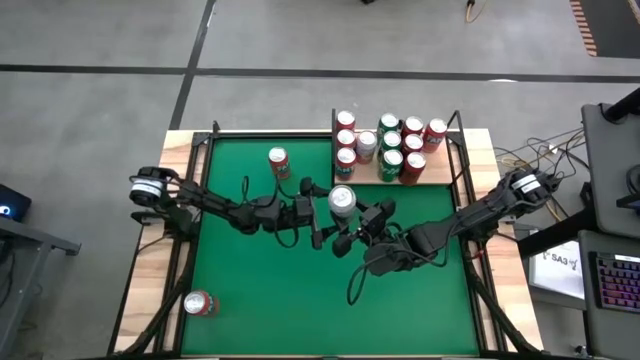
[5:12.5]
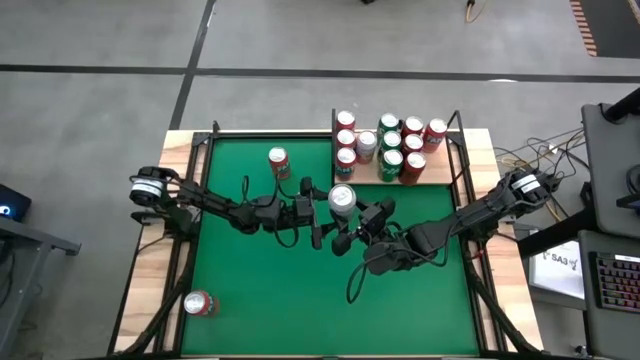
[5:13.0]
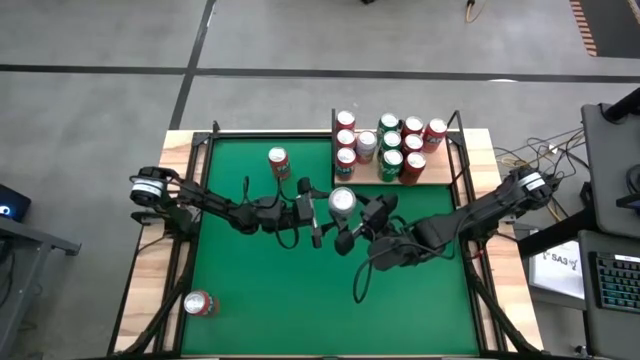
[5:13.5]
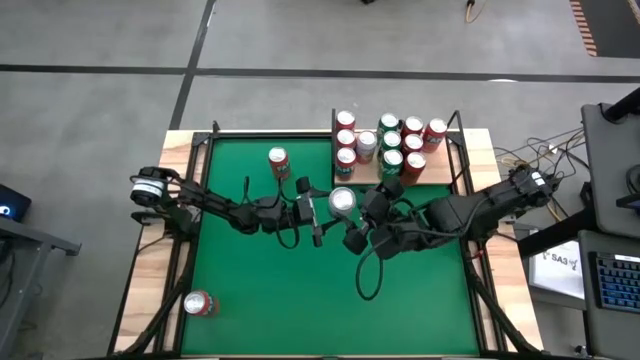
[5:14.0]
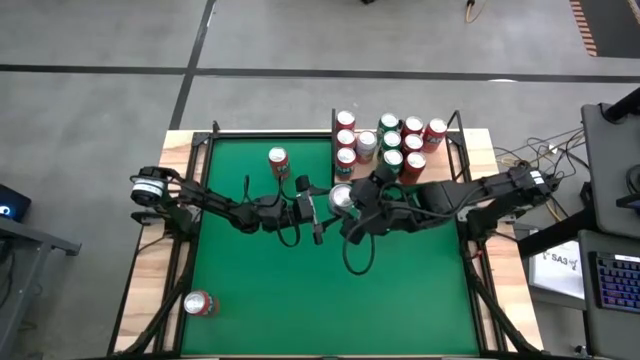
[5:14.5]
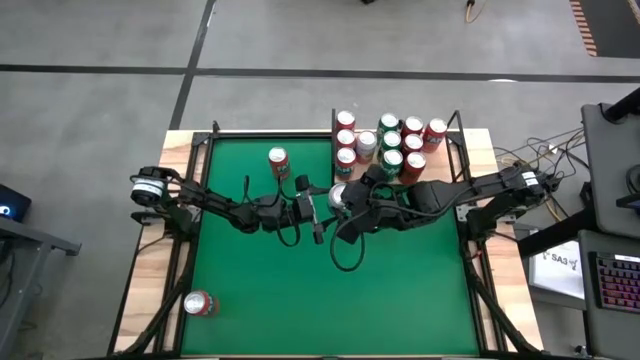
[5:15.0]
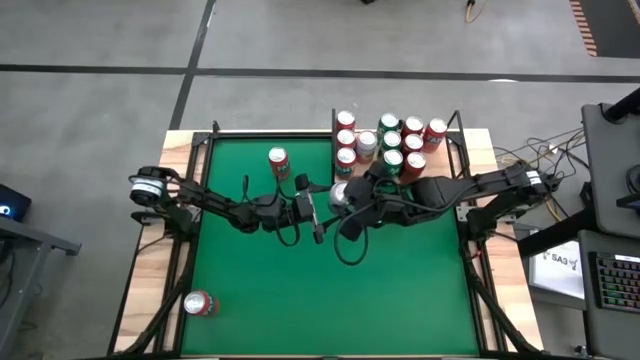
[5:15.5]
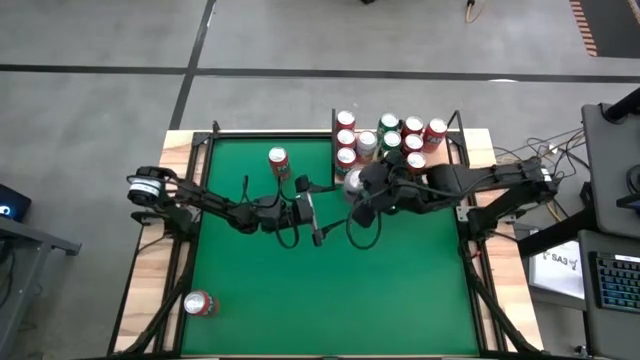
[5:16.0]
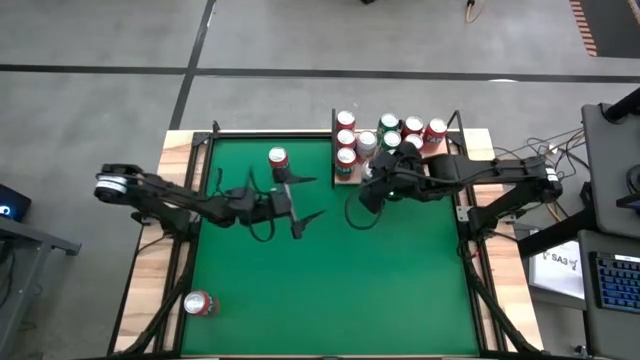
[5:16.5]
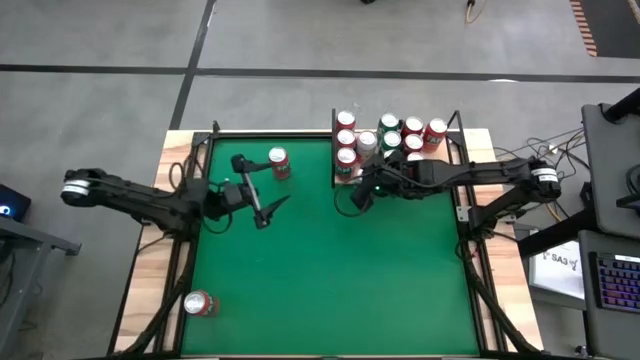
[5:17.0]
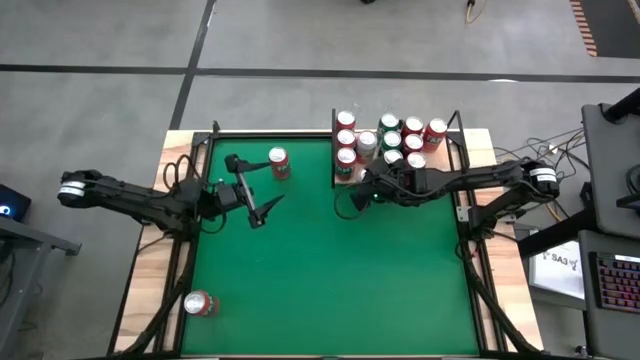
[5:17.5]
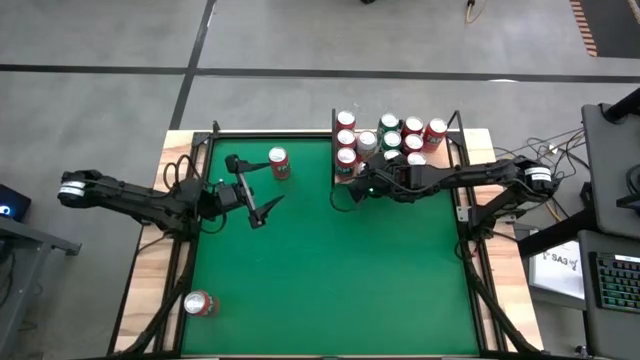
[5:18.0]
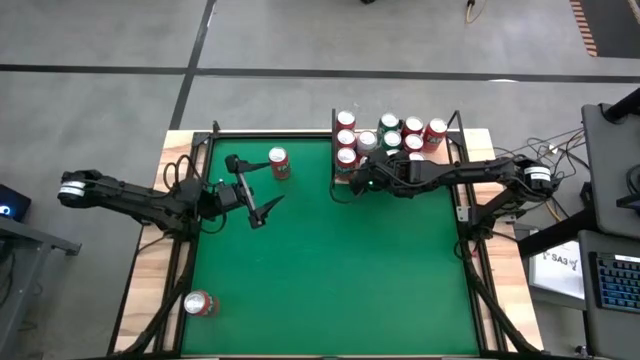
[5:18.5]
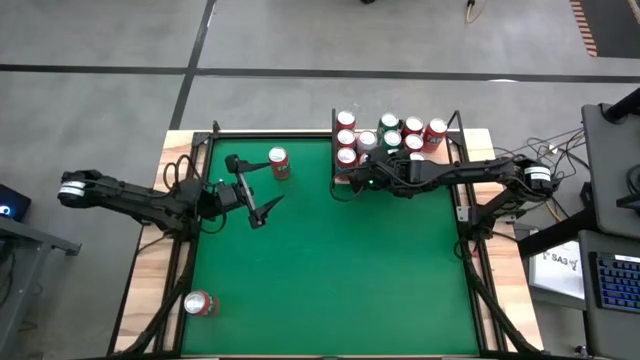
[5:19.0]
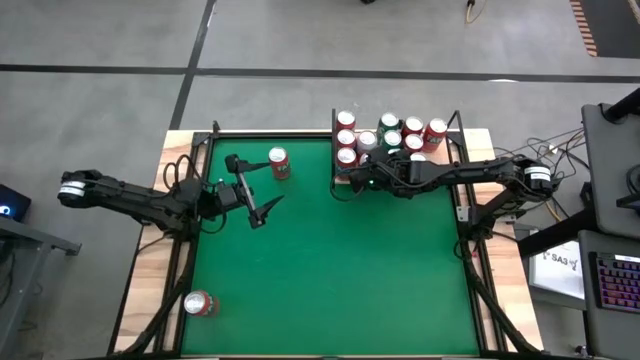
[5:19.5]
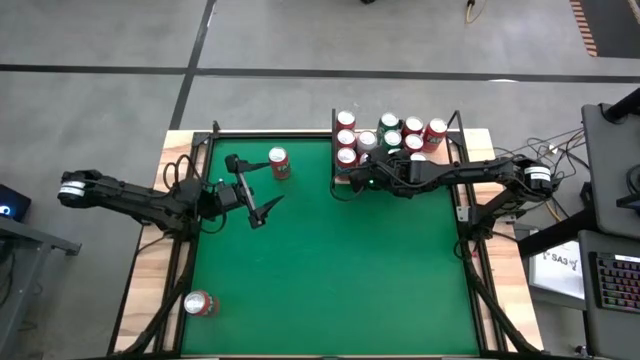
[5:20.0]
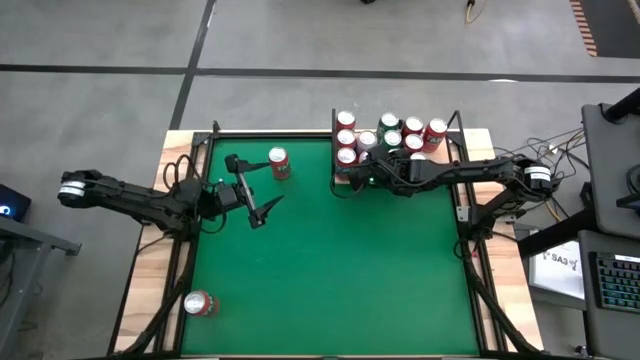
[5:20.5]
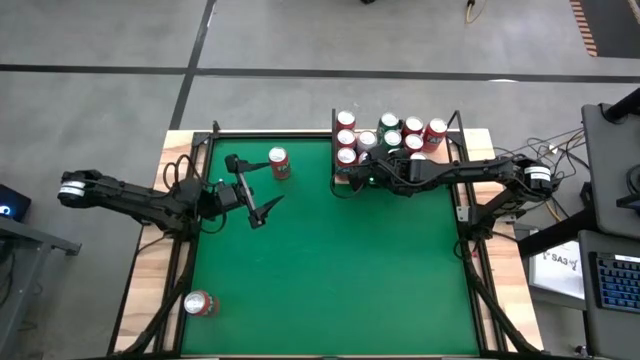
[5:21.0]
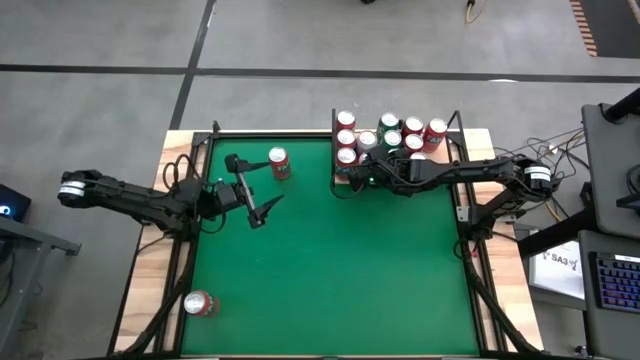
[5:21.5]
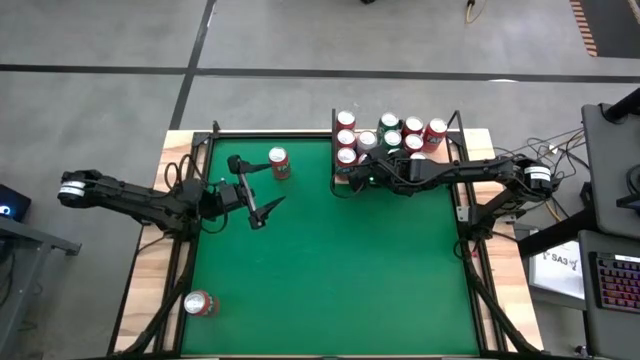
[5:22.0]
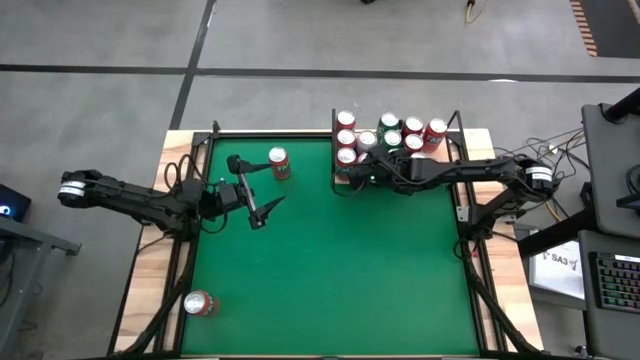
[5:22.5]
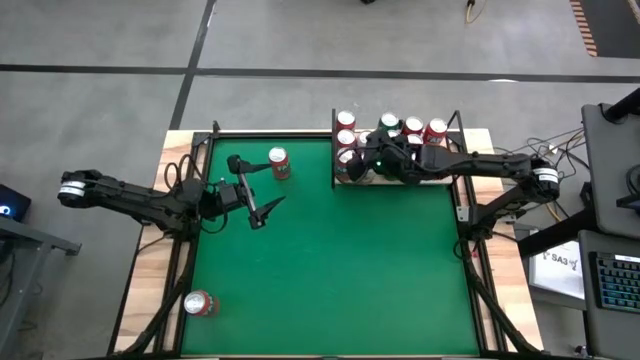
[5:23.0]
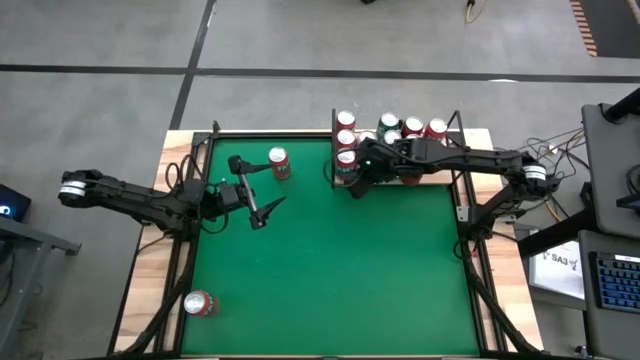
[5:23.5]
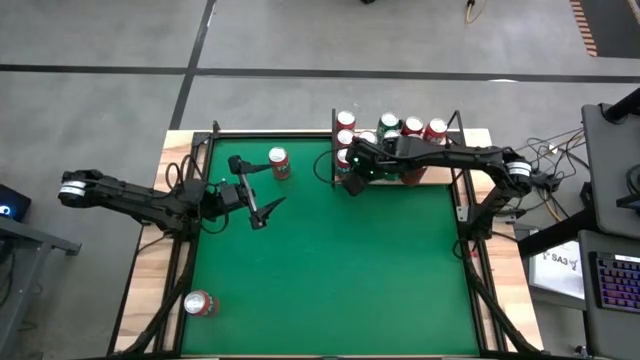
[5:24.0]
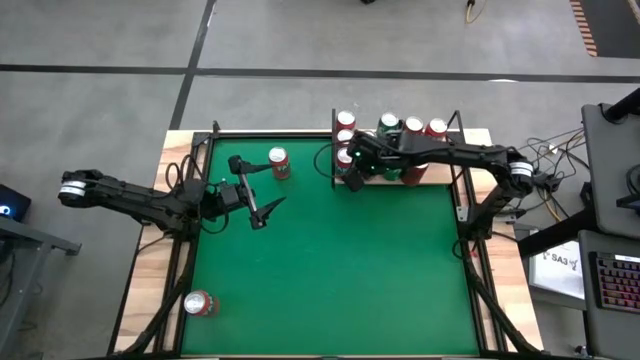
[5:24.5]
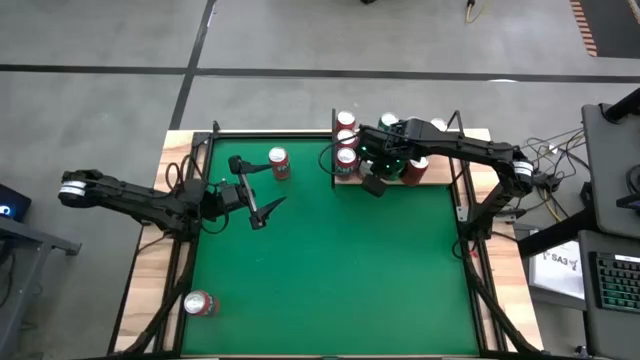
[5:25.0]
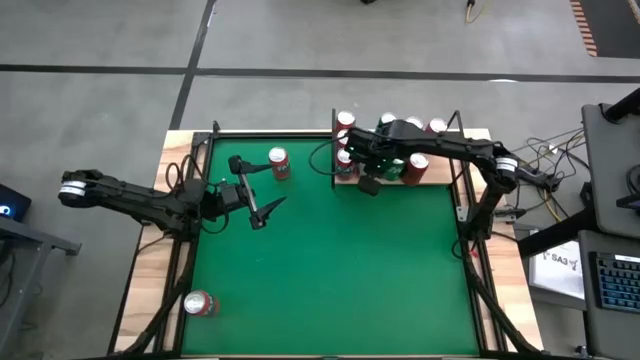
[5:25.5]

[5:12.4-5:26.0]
Task: Place canned beverage on shelf
Put the pink/white soda can on the shelf aligned with the other pink/white soda can

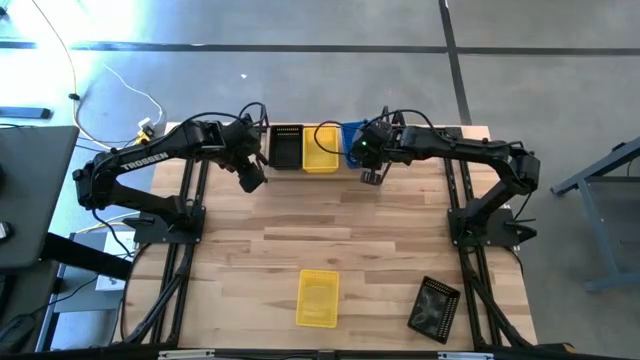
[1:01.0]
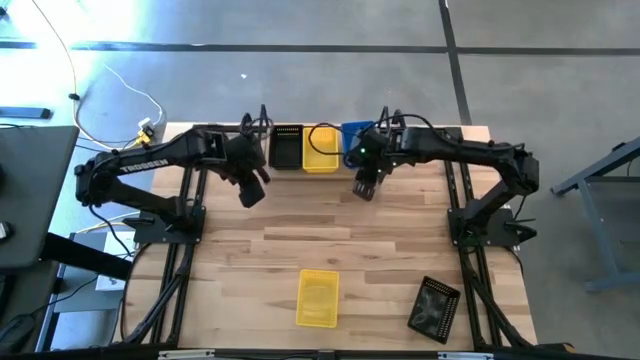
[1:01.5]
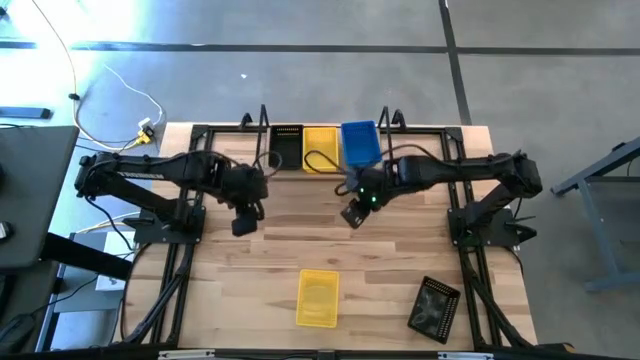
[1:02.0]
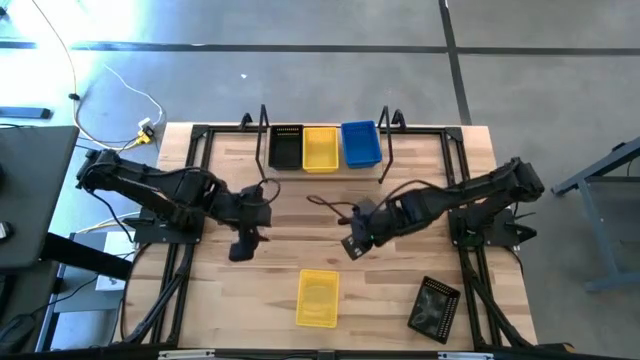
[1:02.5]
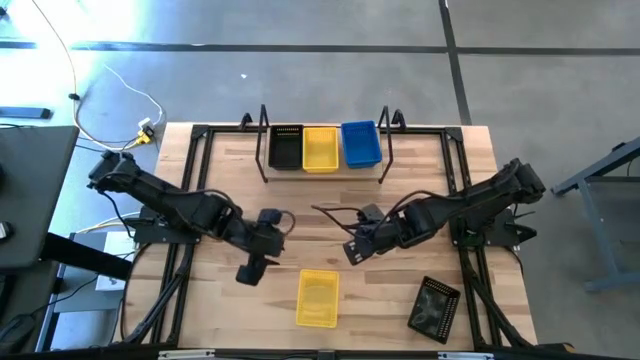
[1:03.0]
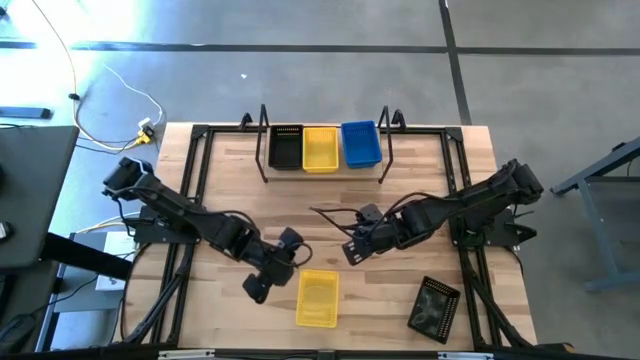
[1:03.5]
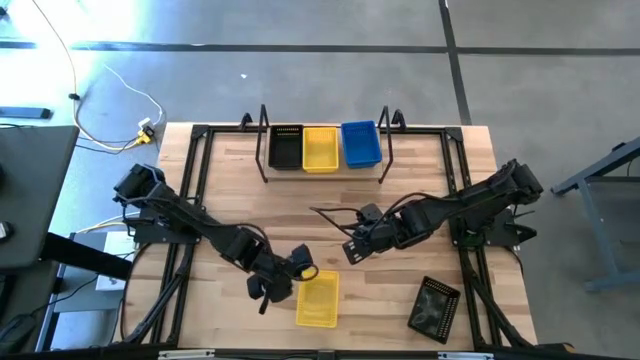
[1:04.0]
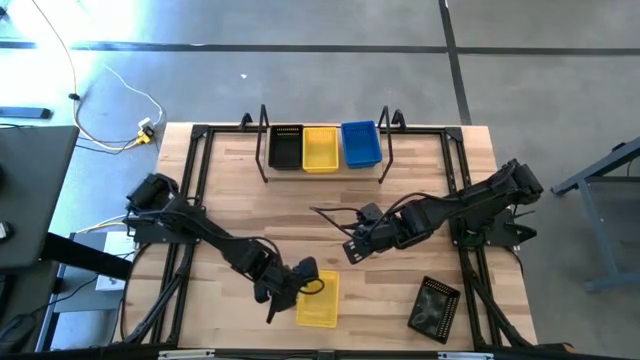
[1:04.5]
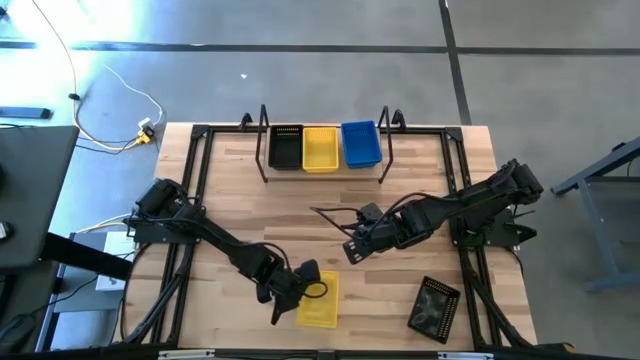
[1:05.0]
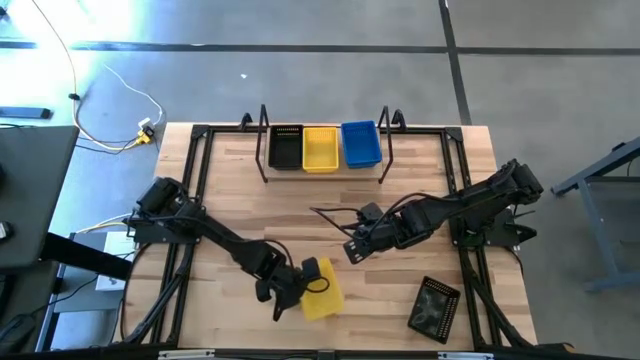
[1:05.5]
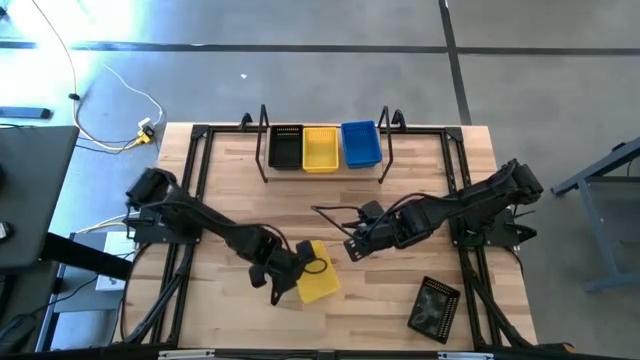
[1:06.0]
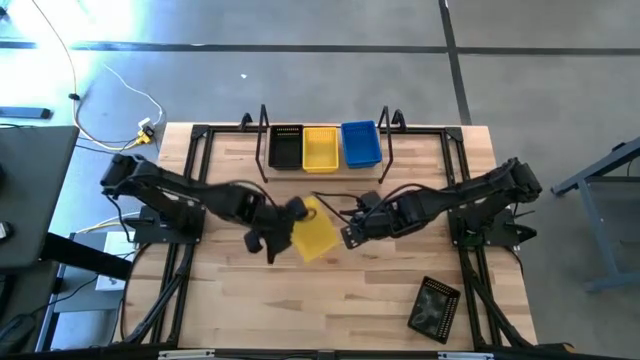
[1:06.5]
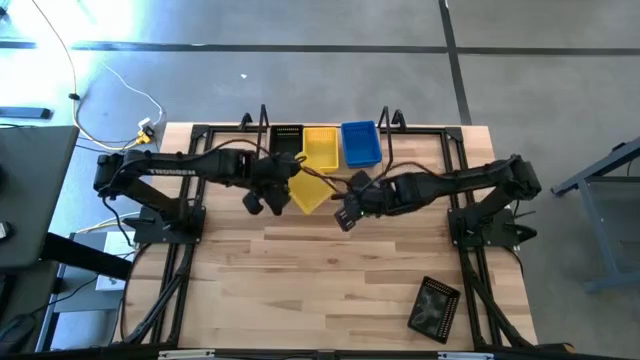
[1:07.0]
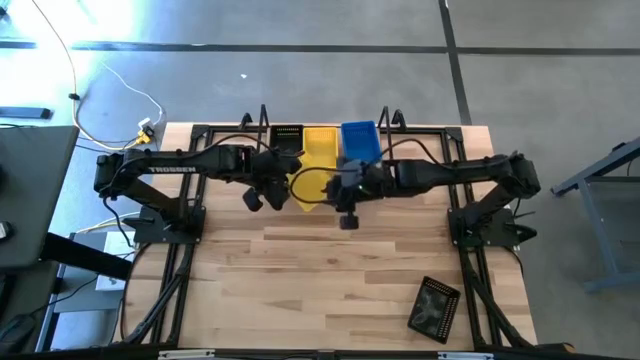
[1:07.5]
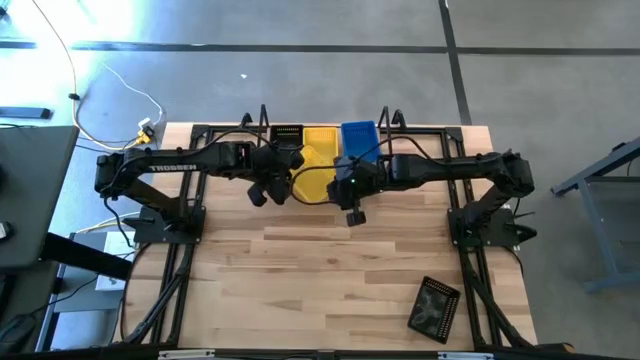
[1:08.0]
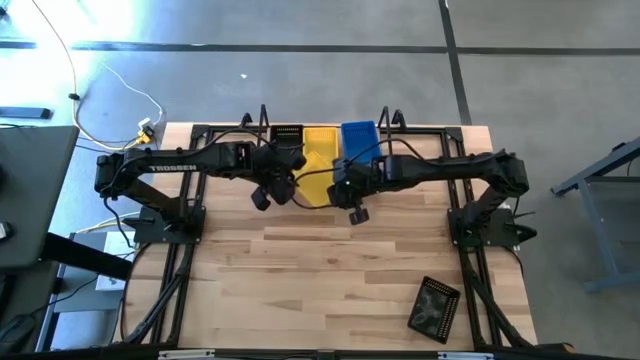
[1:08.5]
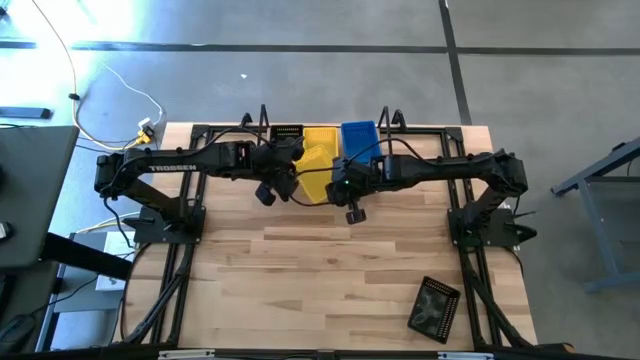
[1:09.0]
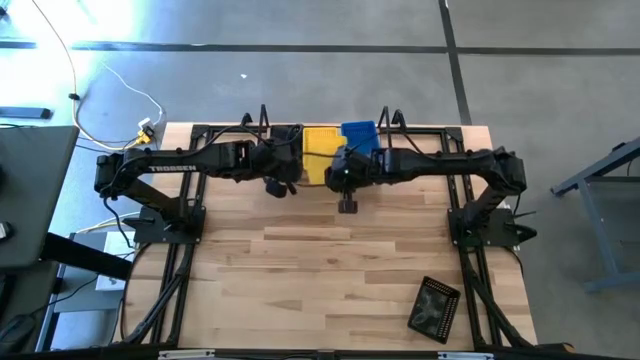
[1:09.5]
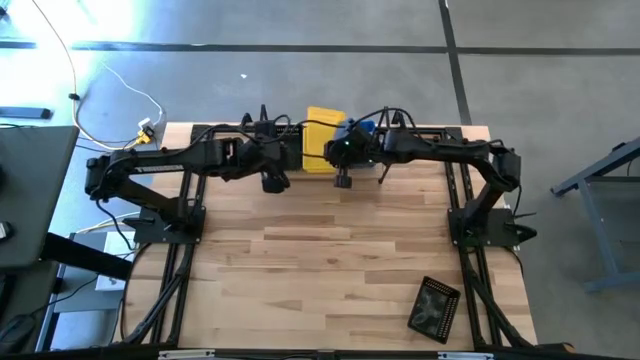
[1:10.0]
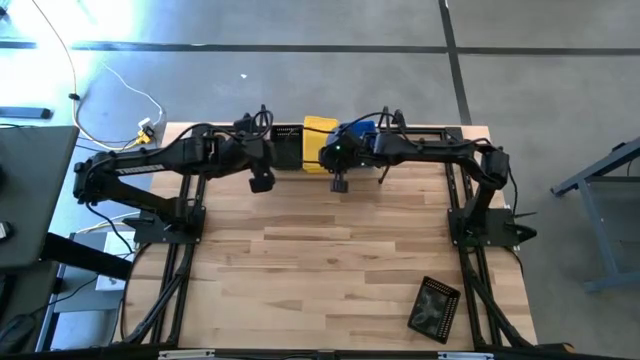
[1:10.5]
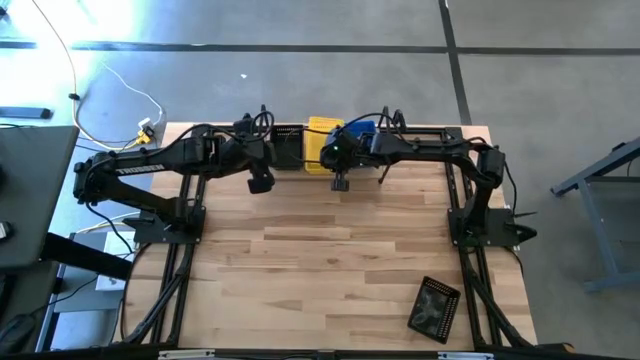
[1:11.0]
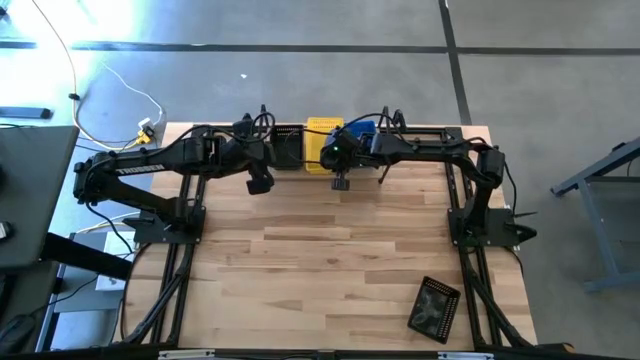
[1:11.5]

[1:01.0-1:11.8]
Task: Stack baskets on shelf by color
Stack the yellow bin on top of the blue bin on the shelf
